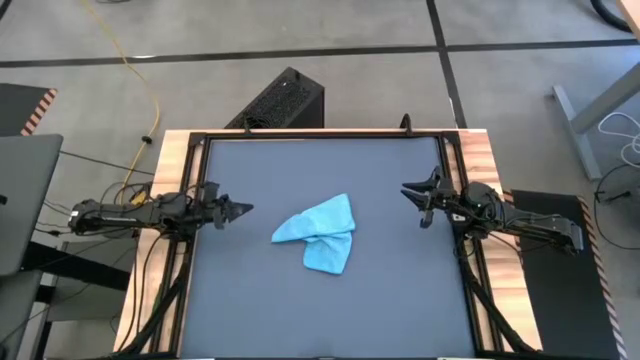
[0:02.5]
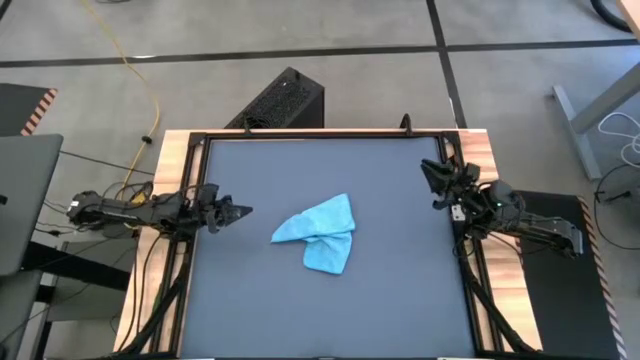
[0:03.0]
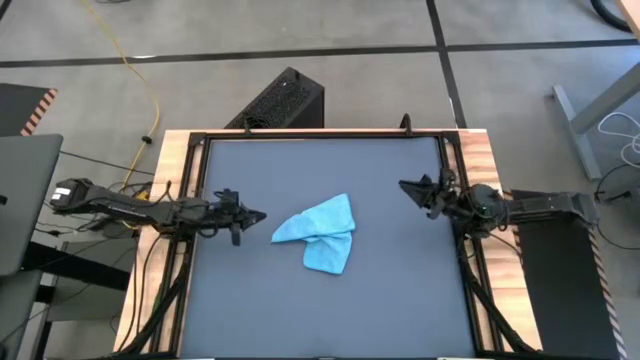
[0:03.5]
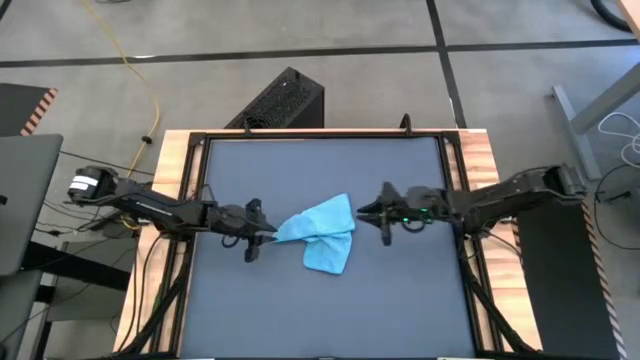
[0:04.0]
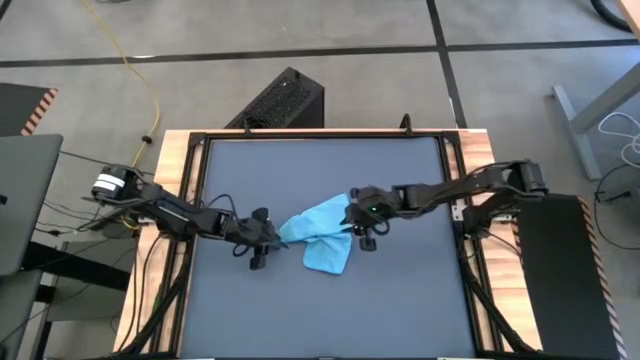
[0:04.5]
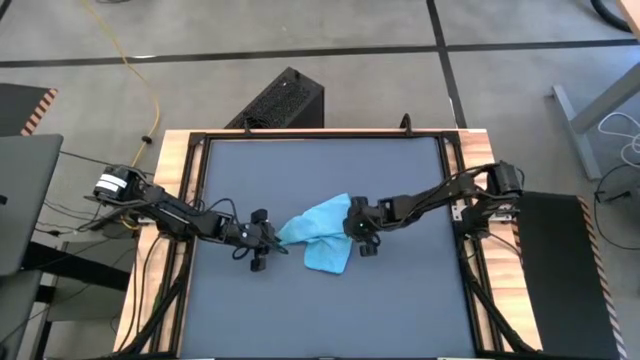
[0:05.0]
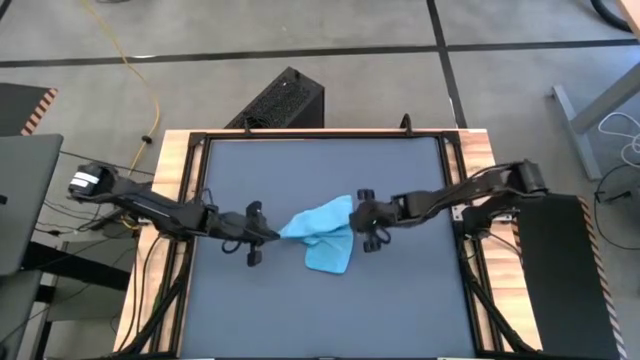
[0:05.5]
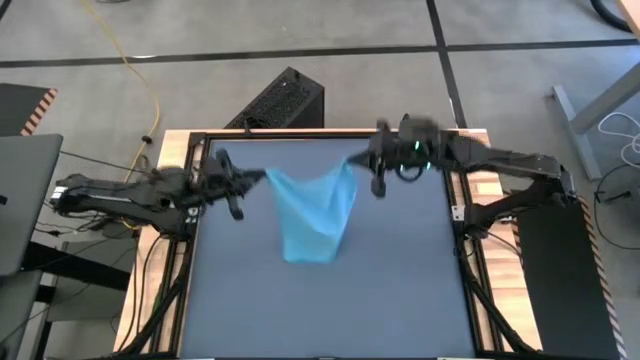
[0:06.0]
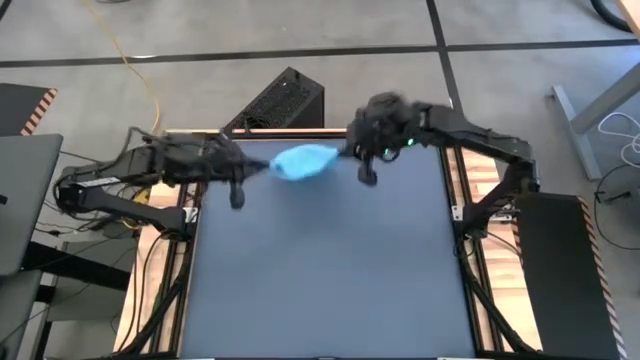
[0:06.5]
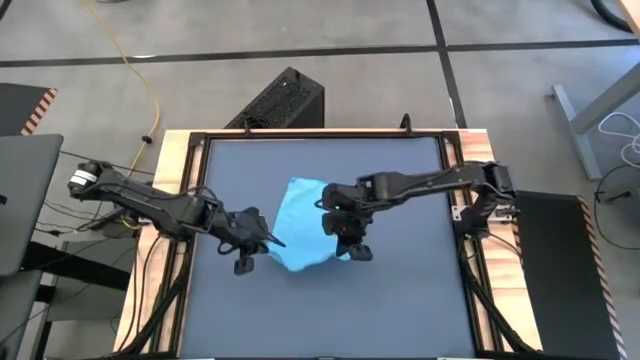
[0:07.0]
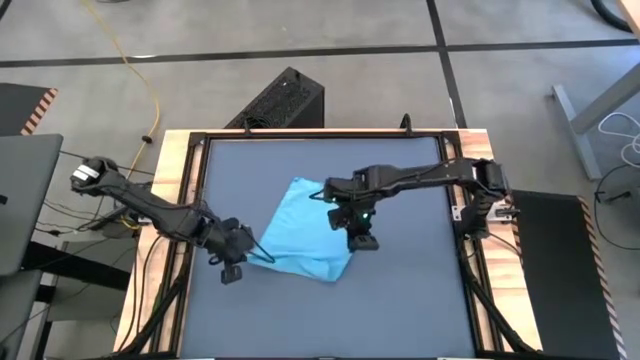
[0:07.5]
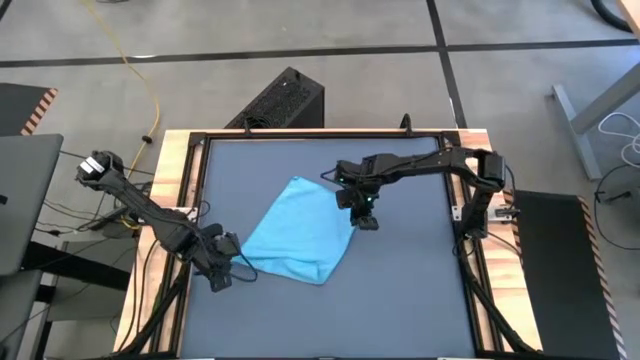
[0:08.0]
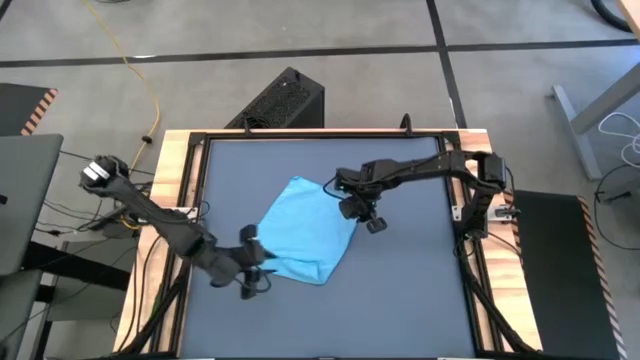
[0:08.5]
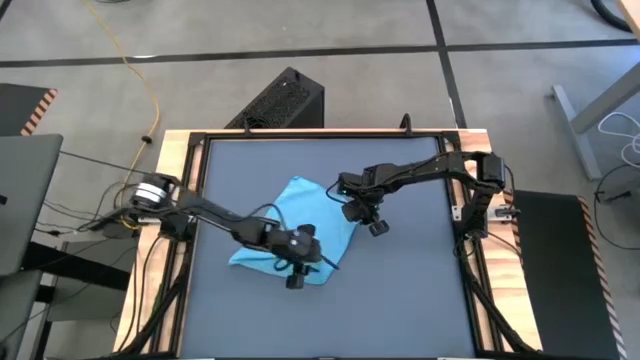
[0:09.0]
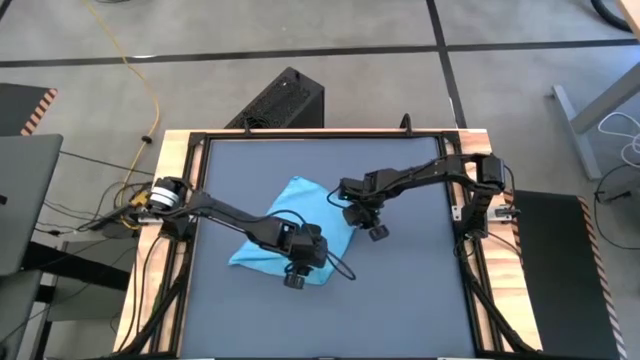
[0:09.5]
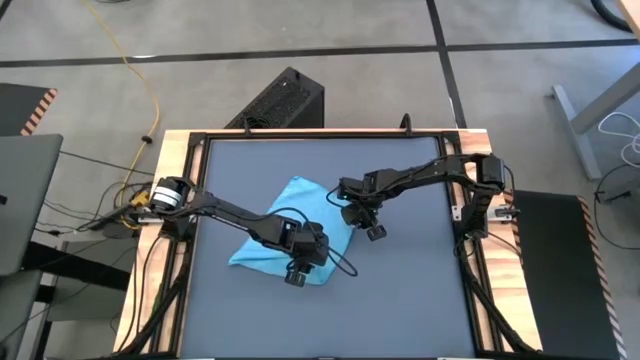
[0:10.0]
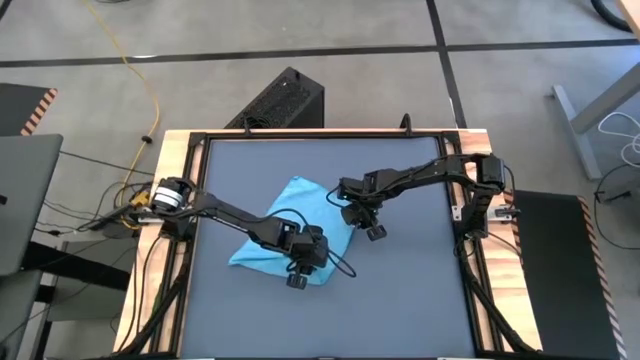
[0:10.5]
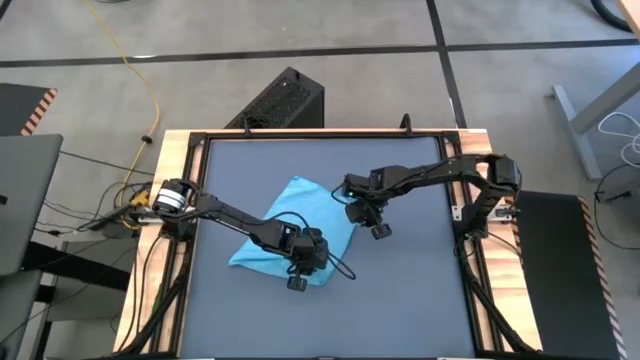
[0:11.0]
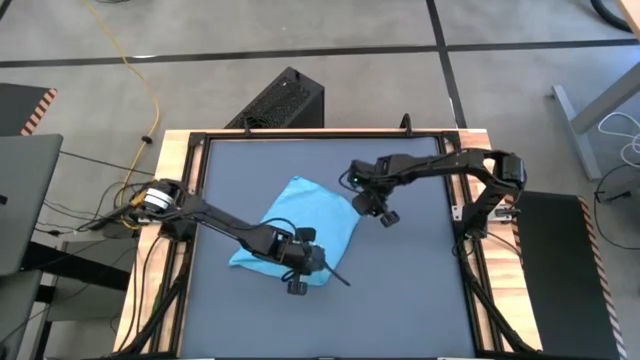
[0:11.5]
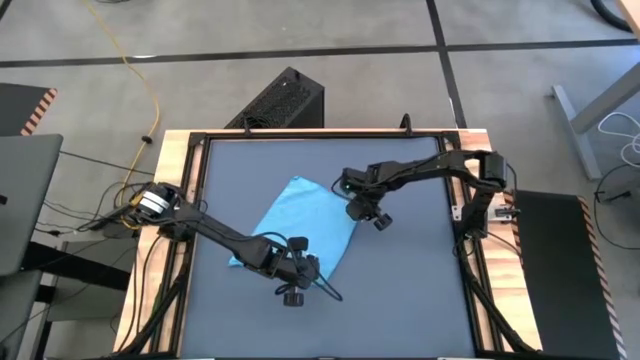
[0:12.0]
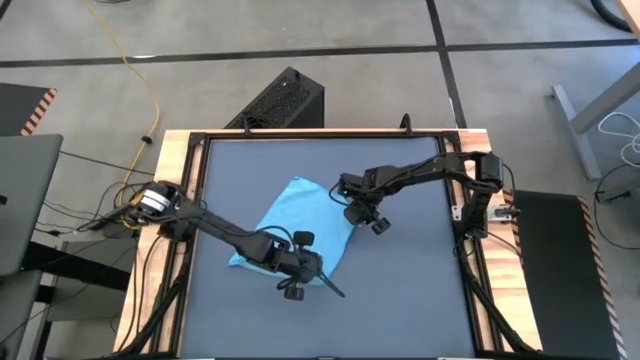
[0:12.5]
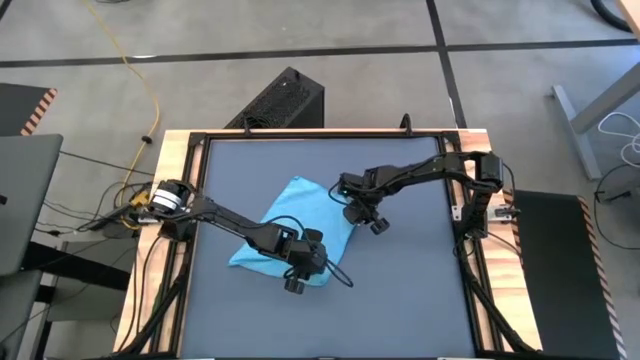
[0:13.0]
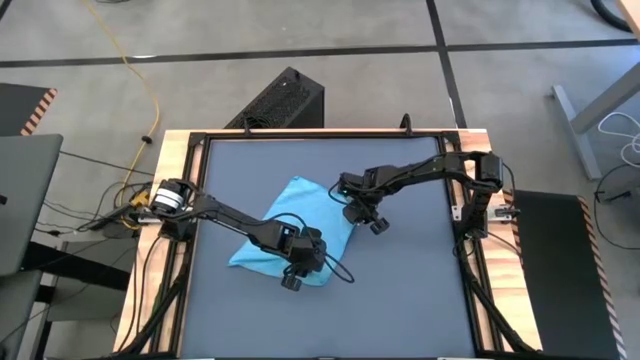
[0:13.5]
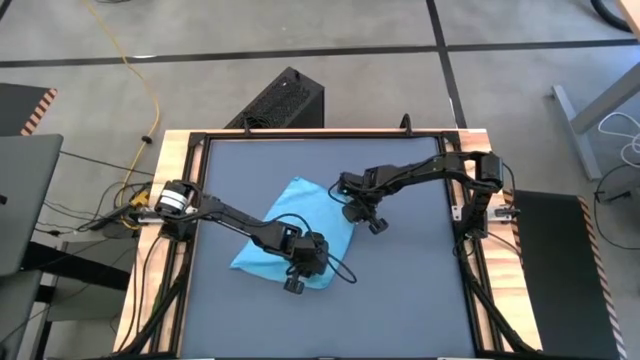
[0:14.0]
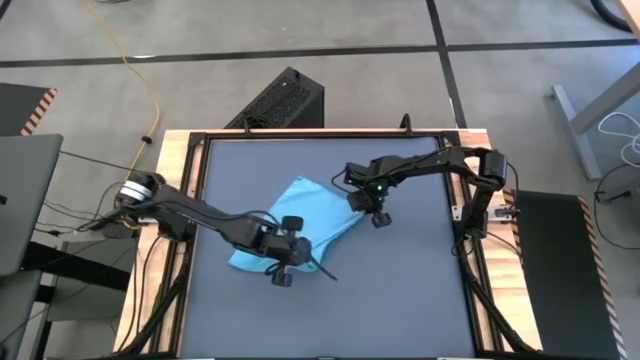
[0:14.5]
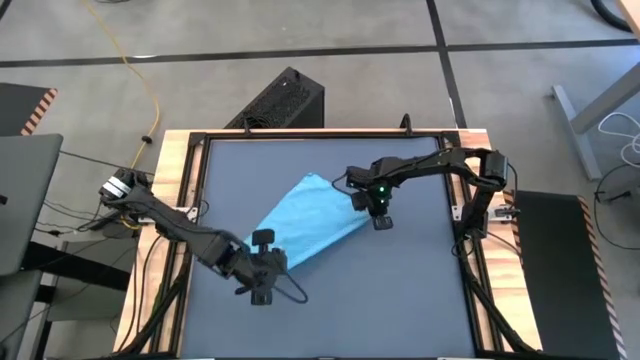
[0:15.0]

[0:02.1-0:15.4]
Task: Roll towel into tight, uniform cylinder
Fold the blue microfiber cloth

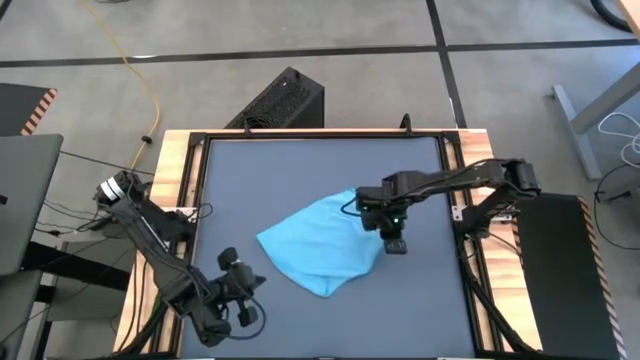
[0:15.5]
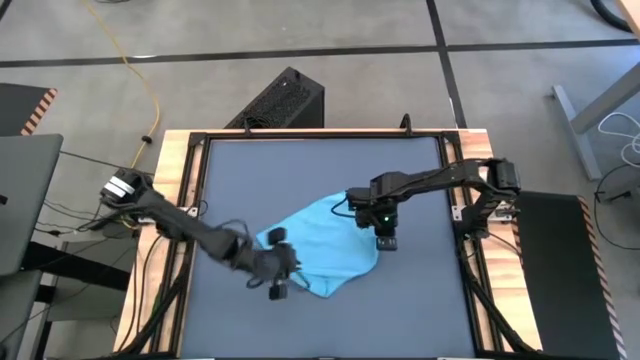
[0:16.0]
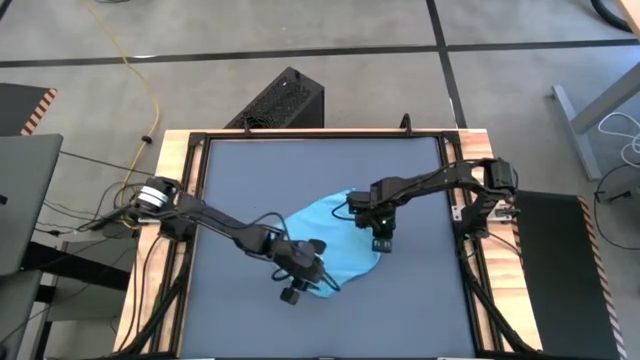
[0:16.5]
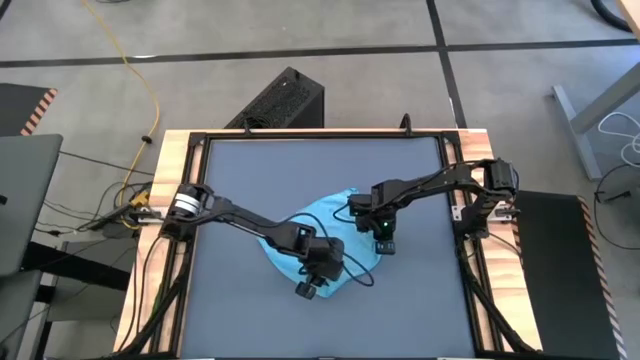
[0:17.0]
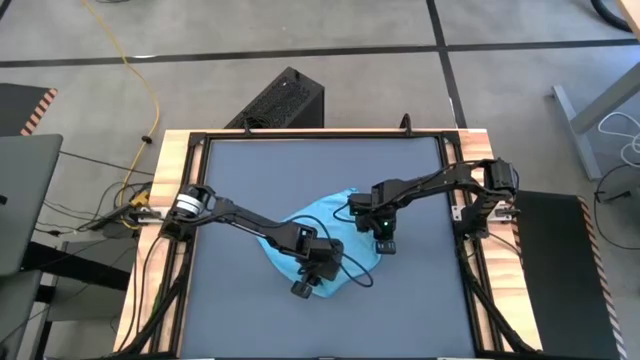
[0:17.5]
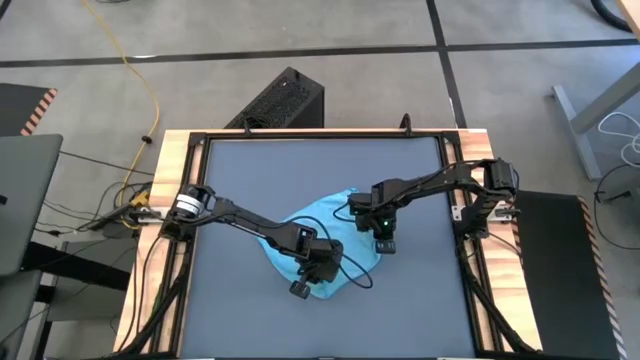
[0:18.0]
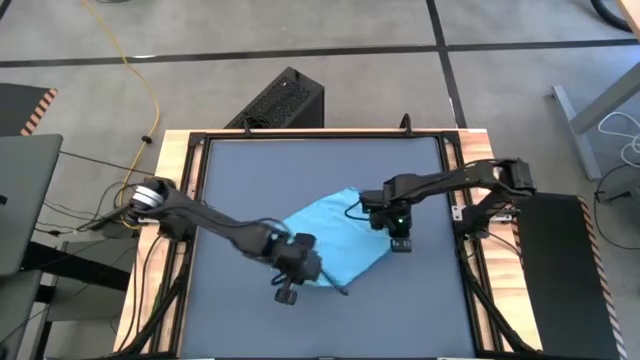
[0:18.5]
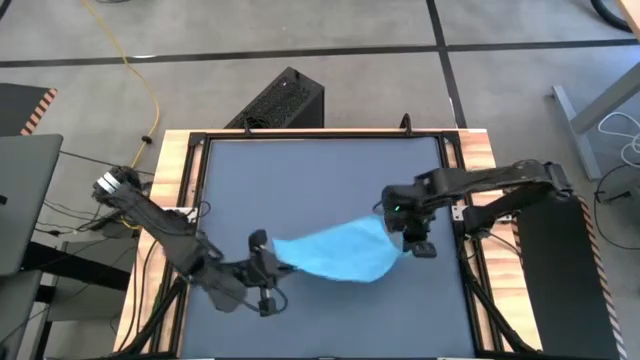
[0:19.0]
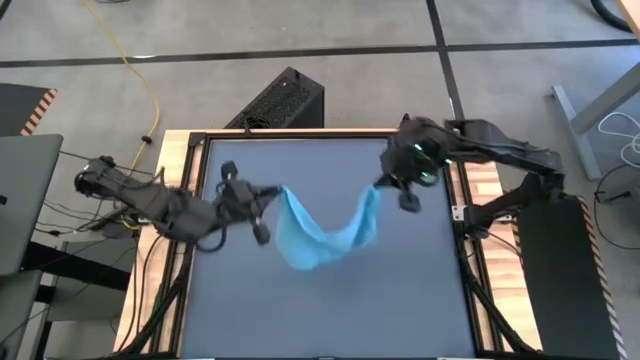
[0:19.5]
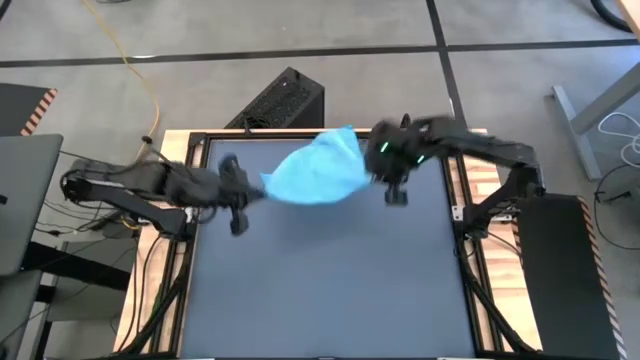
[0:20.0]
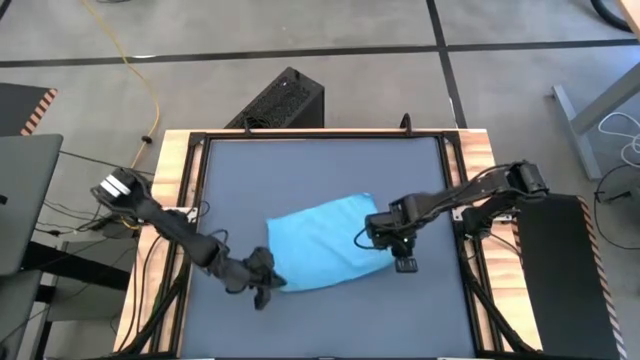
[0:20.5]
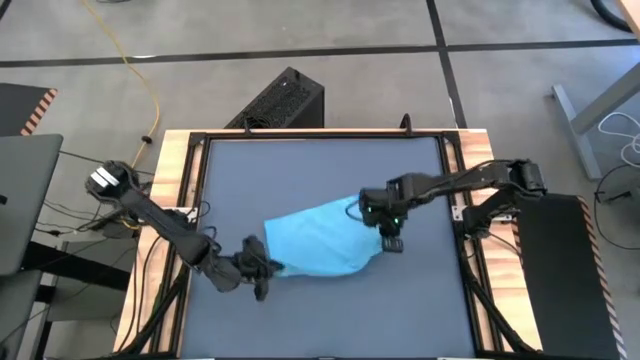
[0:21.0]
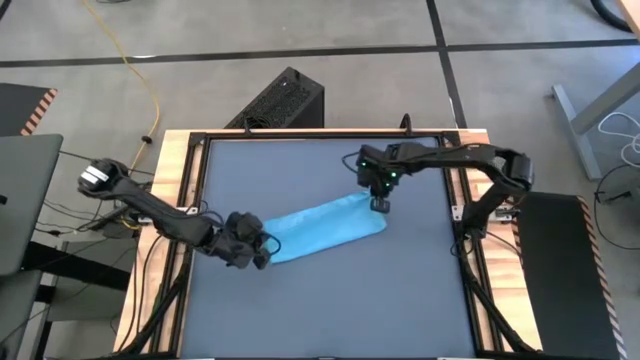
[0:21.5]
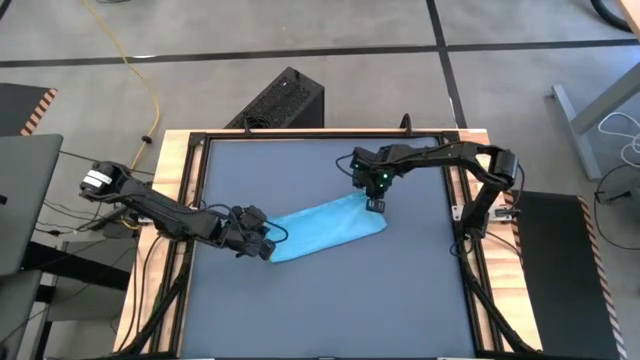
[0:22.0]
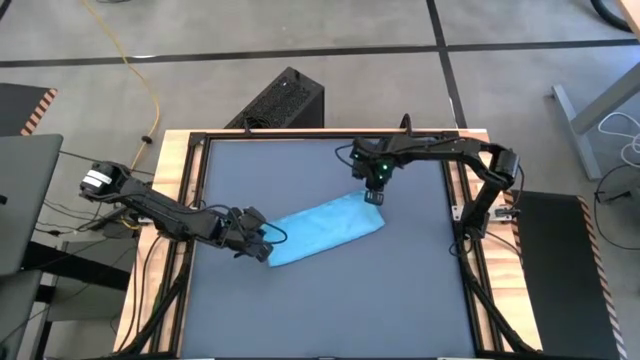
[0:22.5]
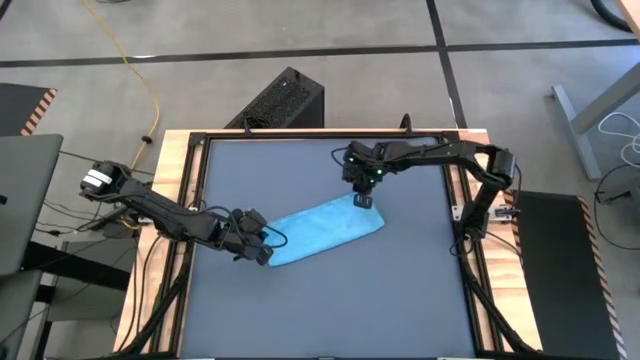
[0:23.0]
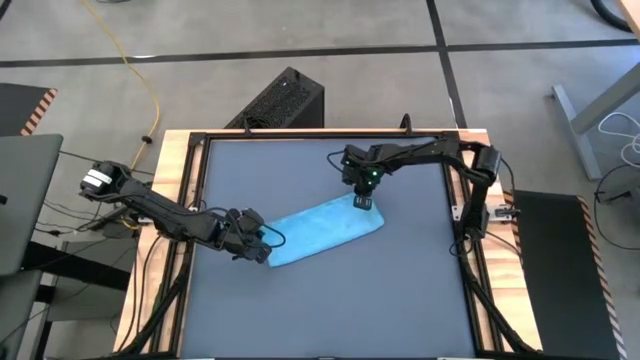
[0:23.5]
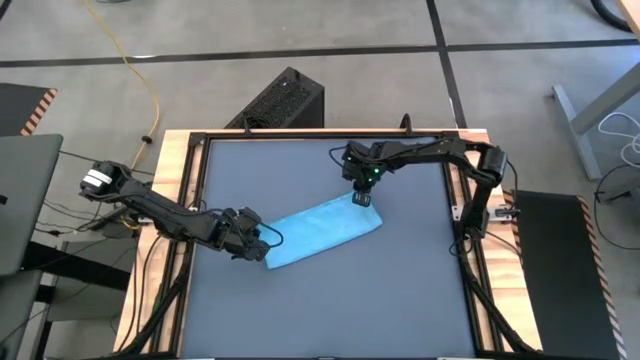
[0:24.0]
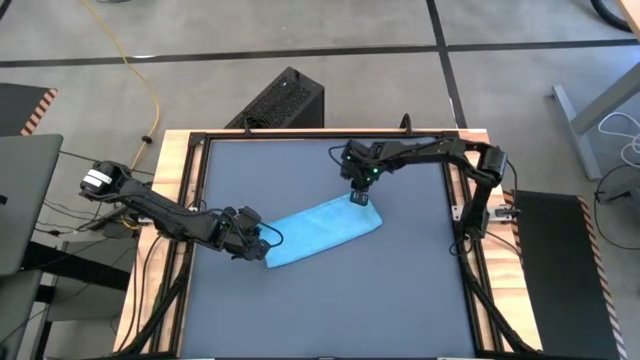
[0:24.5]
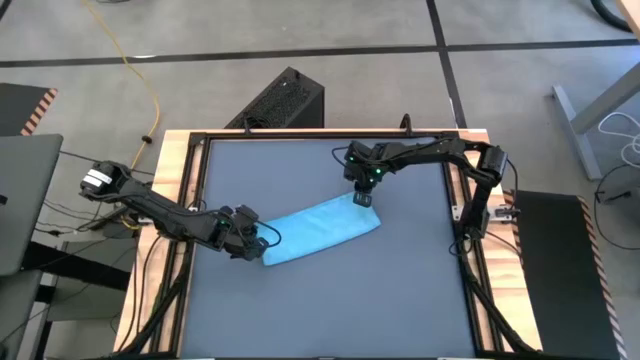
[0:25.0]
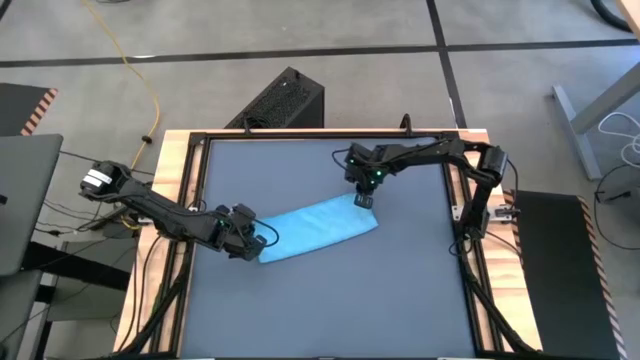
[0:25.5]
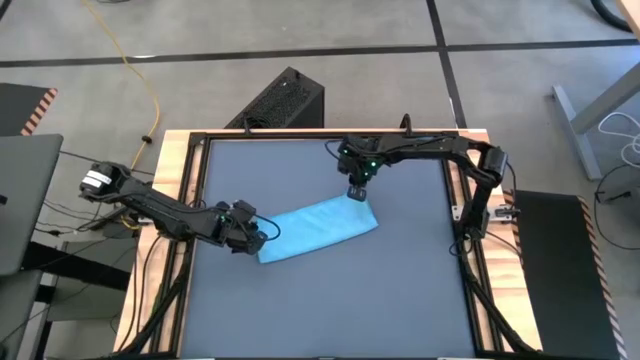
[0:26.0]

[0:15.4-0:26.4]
Fold the blue microfiber cloth
